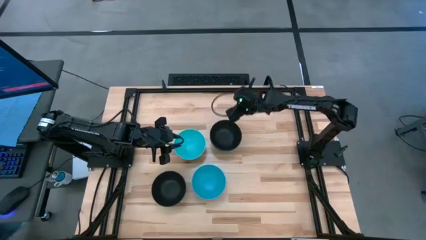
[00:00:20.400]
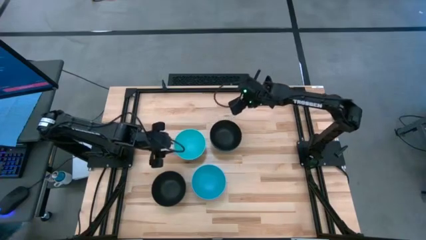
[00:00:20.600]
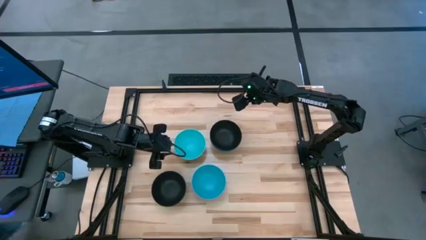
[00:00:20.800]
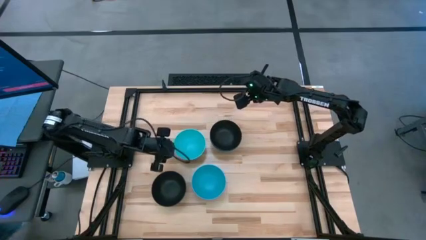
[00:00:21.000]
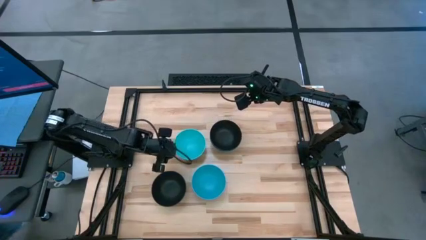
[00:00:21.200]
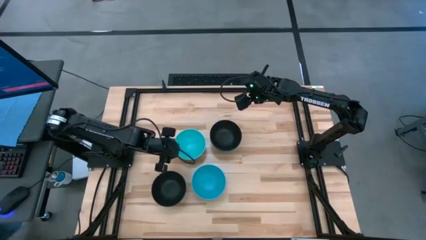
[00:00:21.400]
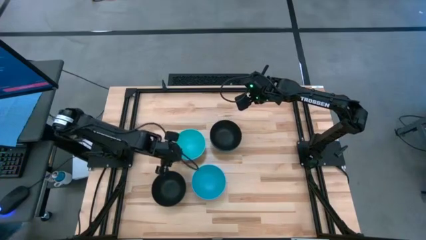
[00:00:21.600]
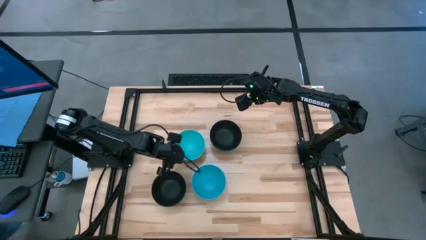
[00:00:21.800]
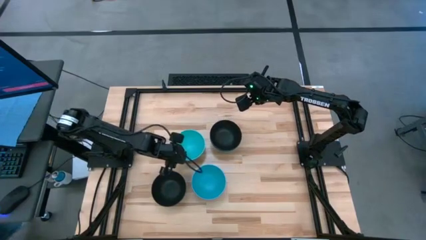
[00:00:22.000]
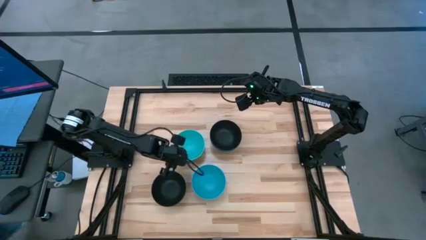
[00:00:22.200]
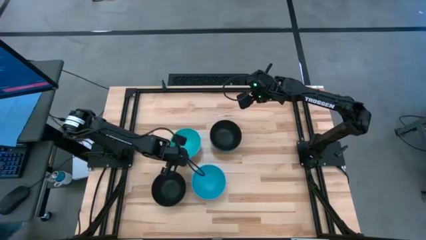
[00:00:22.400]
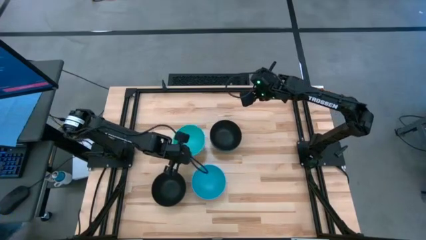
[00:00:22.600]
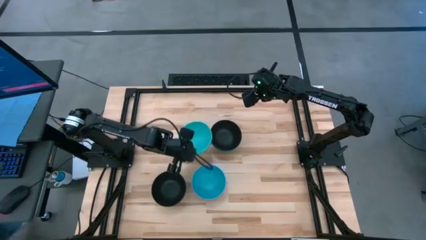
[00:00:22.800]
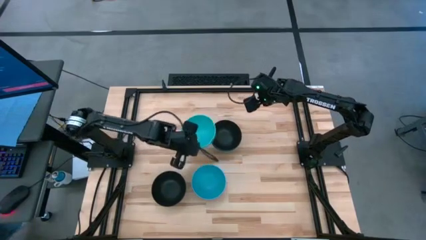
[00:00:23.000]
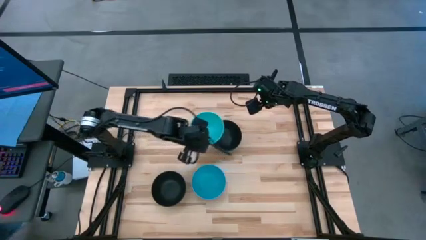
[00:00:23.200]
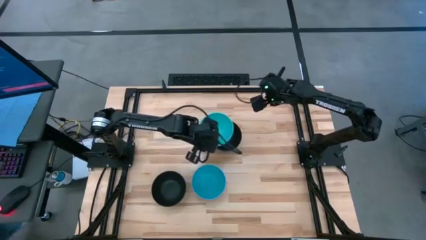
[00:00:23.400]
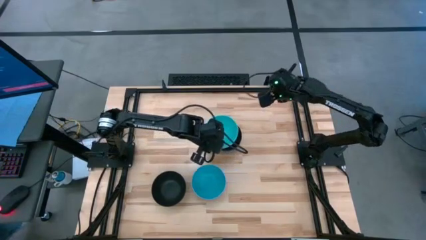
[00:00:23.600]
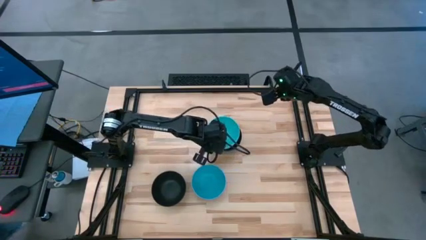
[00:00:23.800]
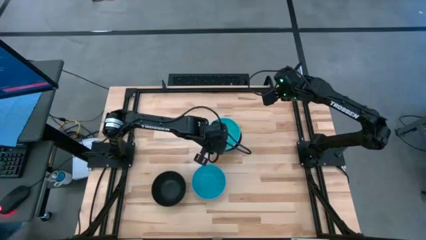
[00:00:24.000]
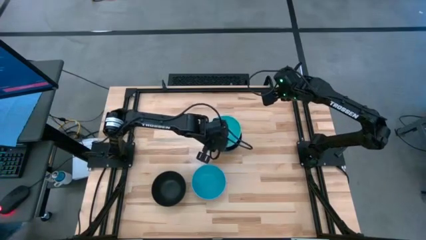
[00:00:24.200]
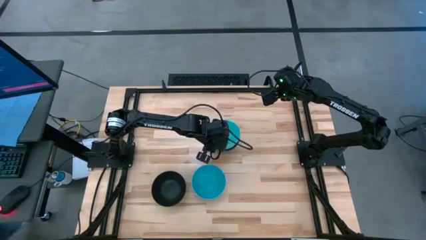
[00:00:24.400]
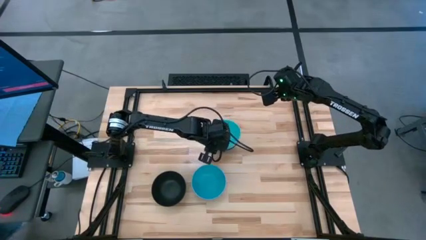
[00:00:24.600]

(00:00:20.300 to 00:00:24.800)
Task: Nest bowls inside each other
Stack the top blue bowl on the black bowl

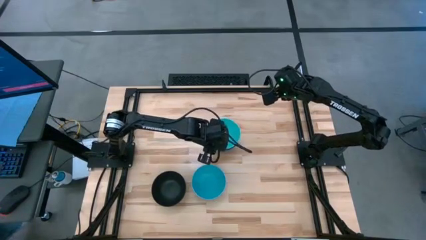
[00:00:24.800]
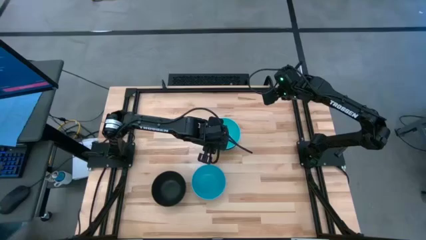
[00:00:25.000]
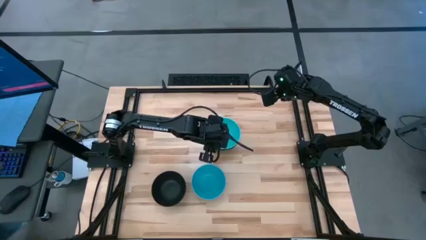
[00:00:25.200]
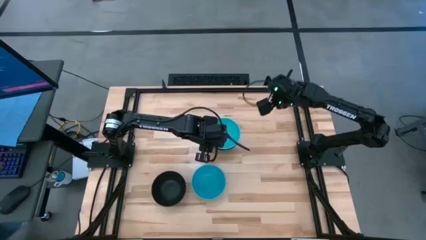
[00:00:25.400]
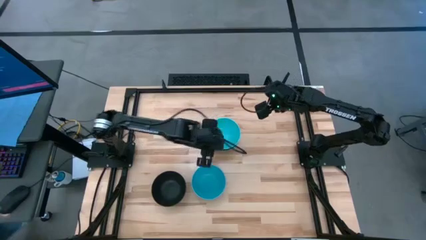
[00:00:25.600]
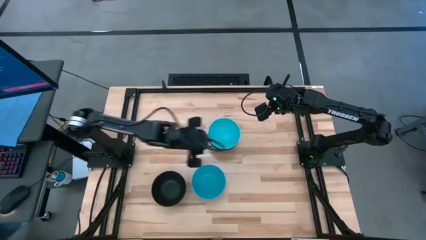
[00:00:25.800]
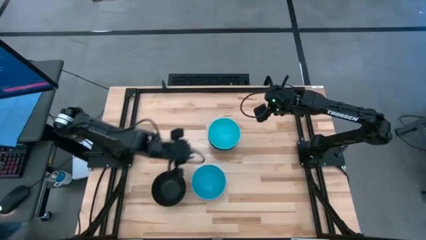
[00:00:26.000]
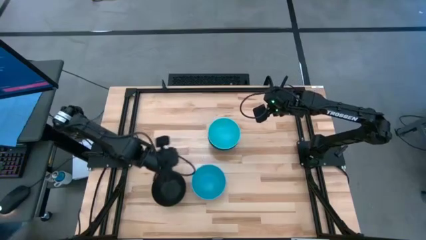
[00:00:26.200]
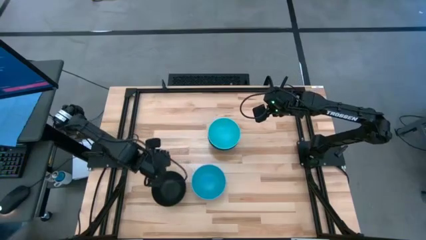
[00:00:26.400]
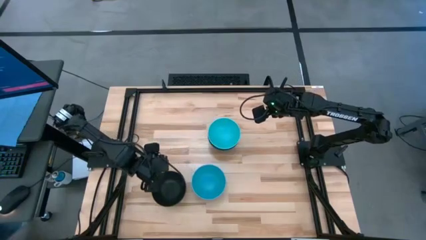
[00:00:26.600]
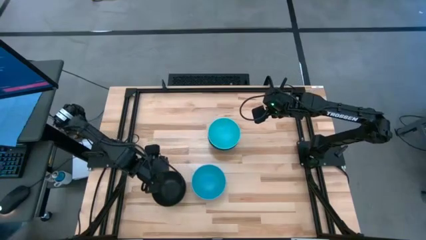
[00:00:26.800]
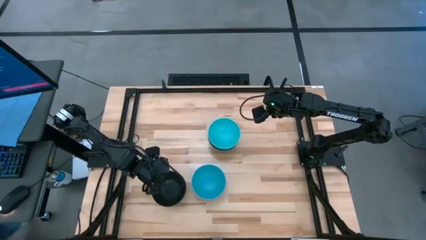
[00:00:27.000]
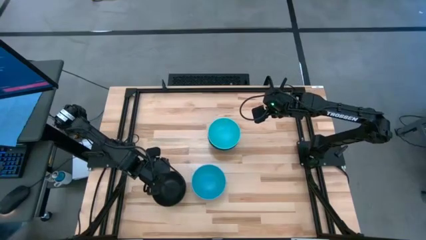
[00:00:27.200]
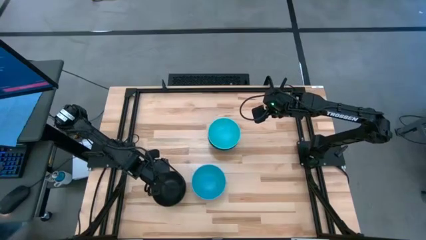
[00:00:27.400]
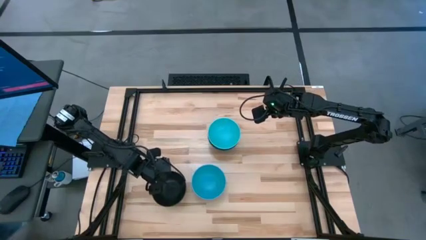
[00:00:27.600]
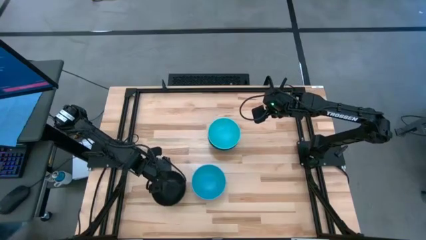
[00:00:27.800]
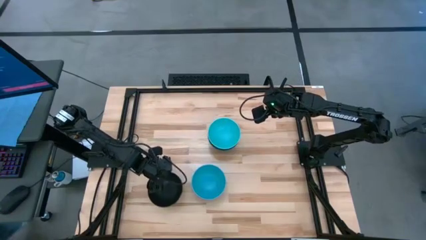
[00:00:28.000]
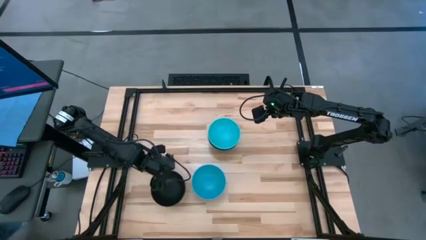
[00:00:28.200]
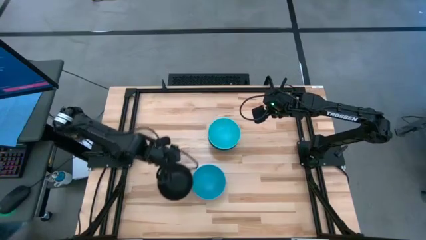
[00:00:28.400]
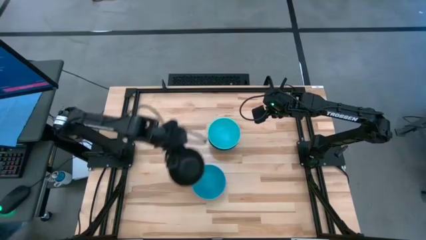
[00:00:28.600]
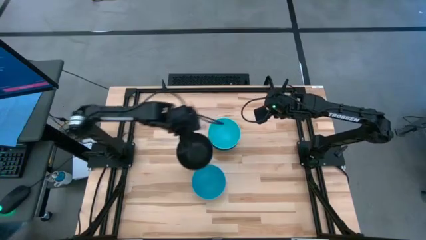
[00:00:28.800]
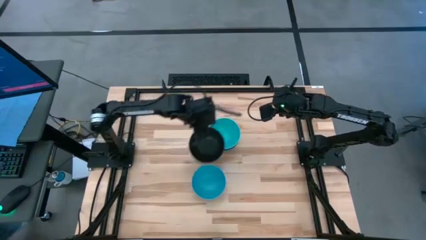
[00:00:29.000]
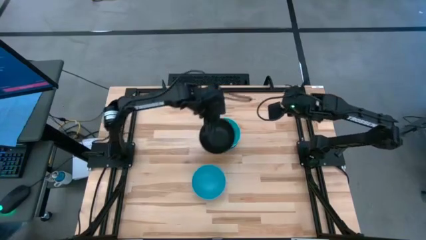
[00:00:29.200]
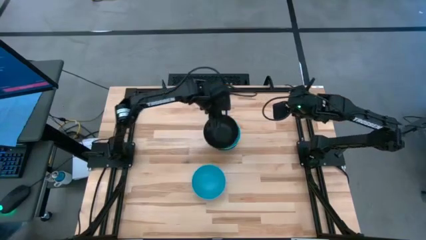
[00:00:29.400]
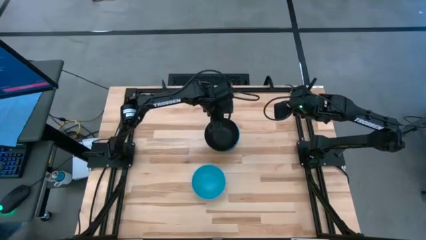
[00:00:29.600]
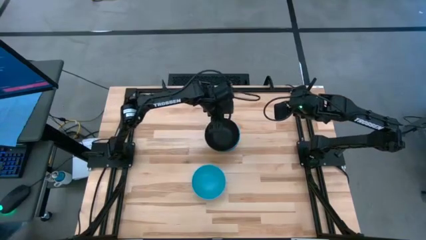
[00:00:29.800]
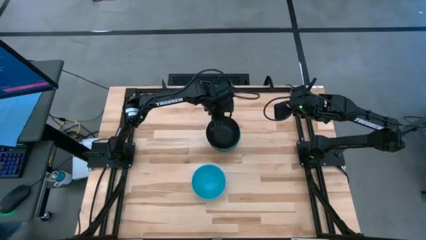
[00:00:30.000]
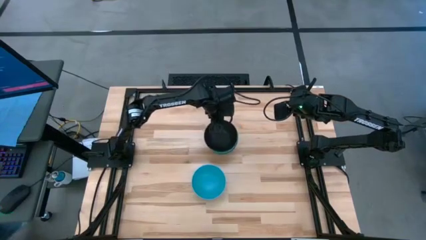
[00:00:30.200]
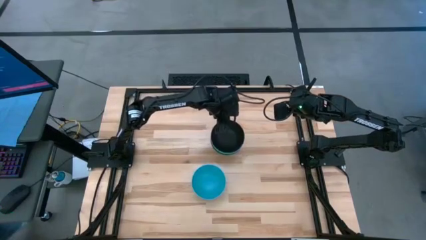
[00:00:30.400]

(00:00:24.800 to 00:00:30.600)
Stack the black bowl on the blue bowl

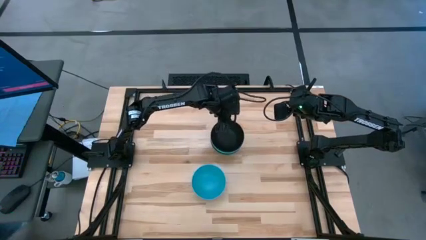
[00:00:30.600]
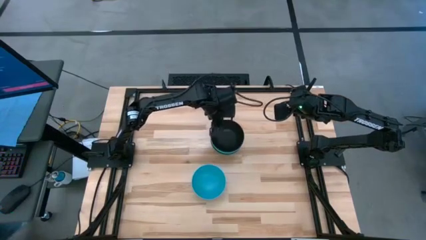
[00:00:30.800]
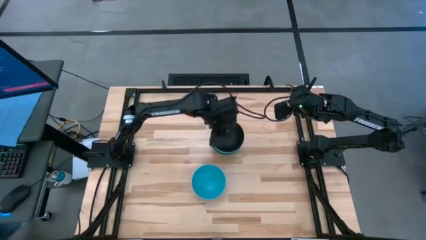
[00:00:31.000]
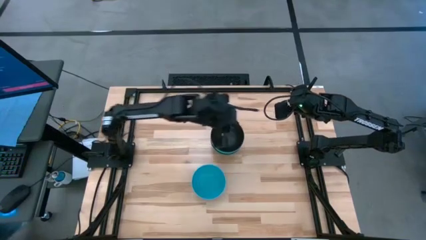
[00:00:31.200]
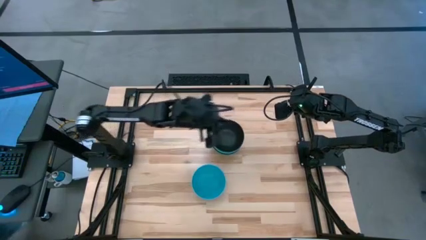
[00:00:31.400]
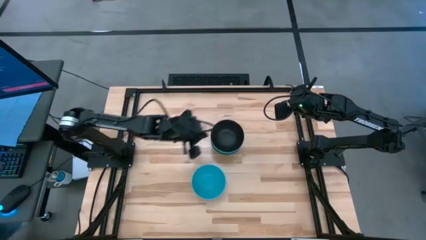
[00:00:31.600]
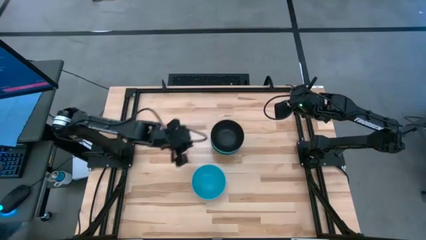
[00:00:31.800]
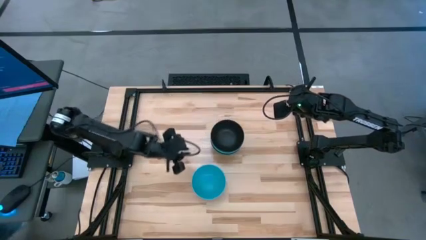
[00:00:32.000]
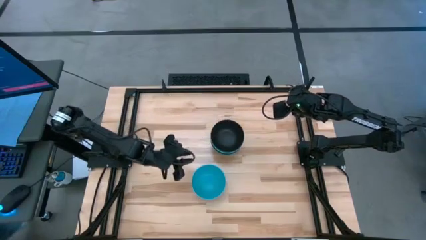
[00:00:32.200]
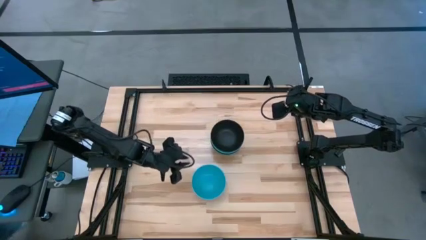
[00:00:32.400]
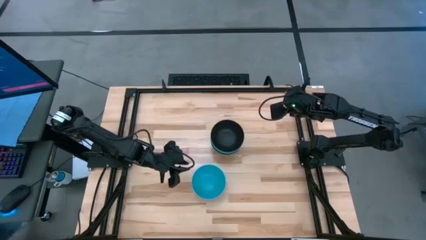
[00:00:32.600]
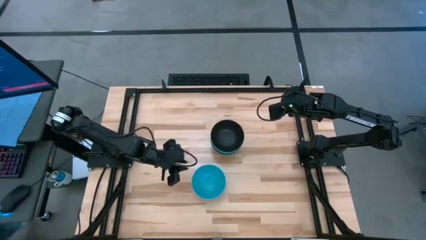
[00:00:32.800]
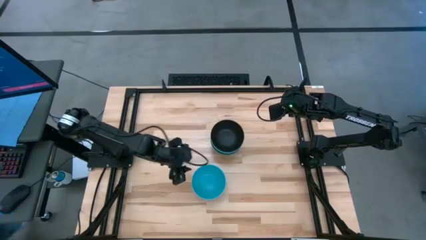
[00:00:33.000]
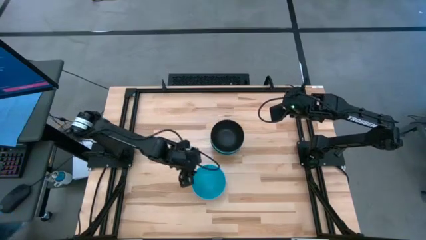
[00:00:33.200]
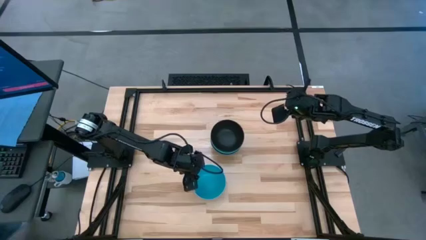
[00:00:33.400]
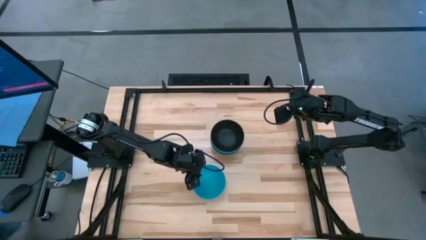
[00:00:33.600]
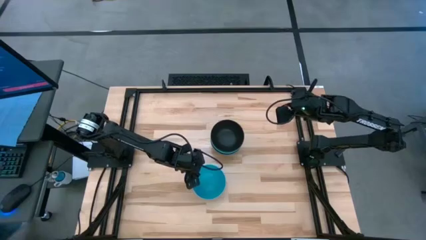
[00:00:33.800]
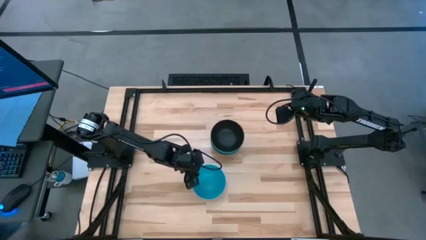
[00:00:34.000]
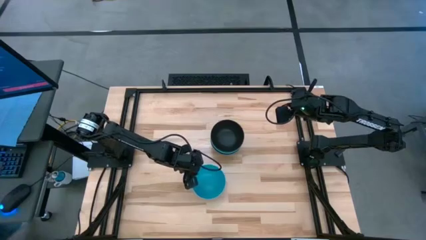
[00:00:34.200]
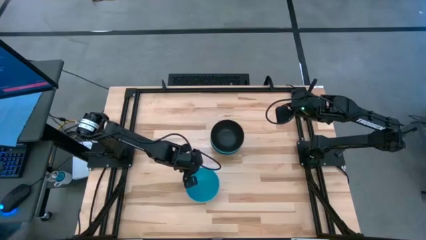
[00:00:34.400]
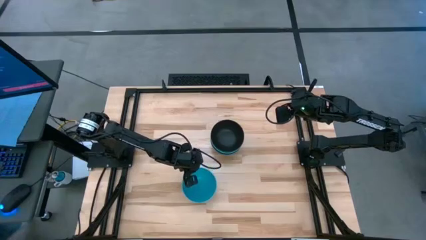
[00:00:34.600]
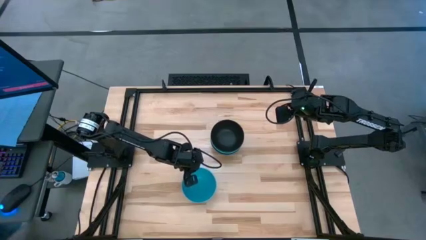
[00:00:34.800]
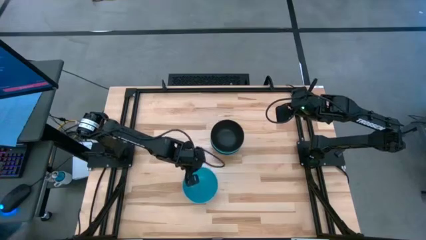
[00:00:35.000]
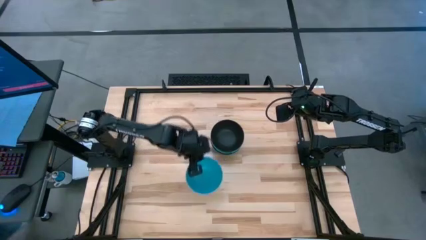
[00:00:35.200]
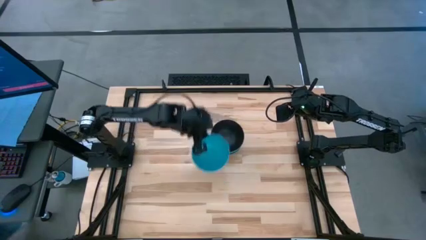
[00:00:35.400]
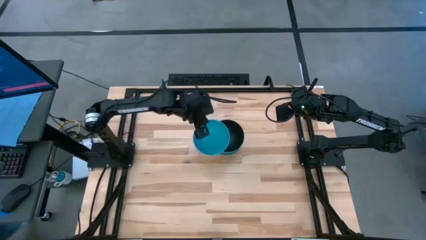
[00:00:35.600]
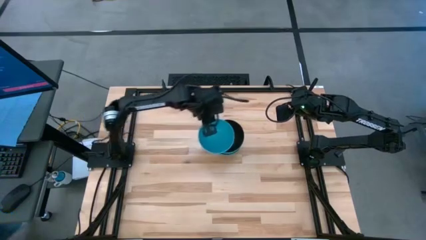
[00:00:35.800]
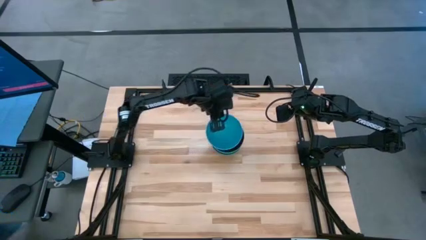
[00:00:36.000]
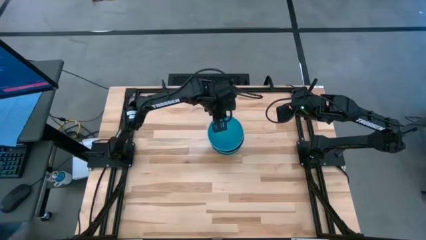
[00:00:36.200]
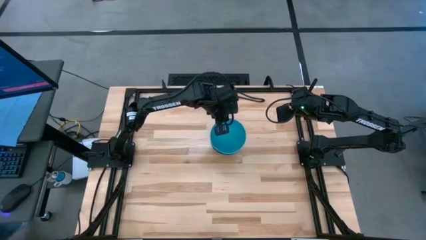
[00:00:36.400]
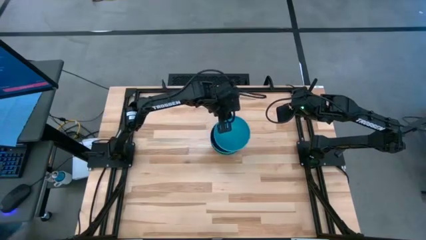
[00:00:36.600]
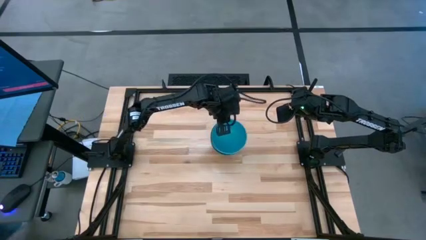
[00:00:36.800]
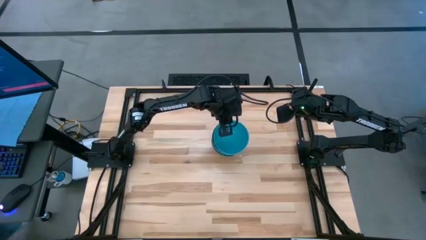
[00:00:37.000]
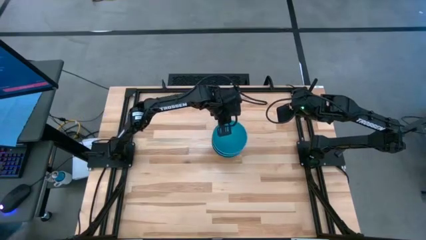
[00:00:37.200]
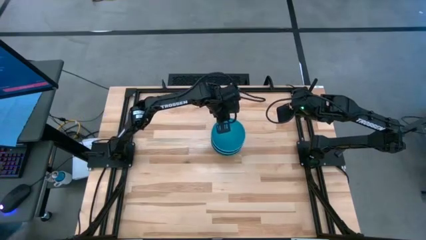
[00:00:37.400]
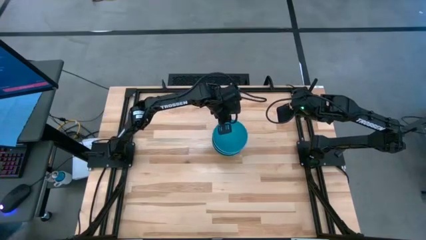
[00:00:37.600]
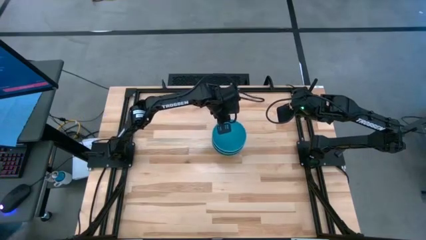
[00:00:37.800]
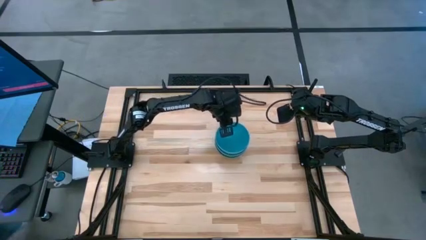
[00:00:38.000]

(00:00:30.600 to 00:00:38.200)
Stack the blue bowl on the black bowl
